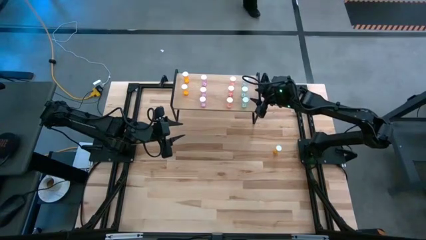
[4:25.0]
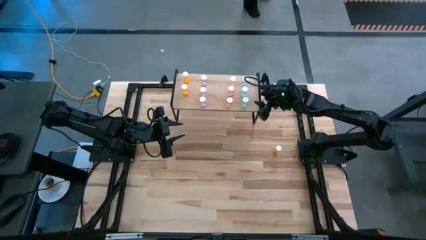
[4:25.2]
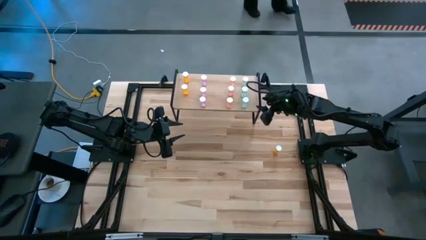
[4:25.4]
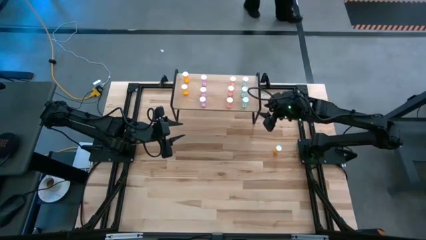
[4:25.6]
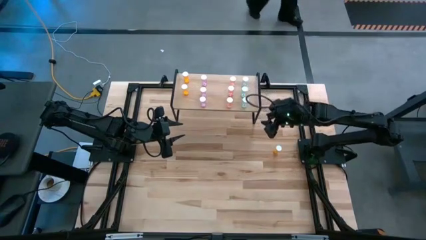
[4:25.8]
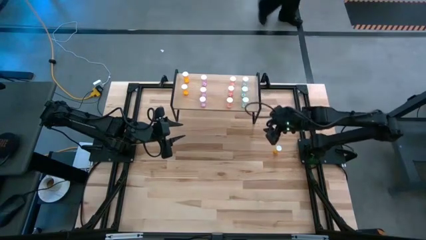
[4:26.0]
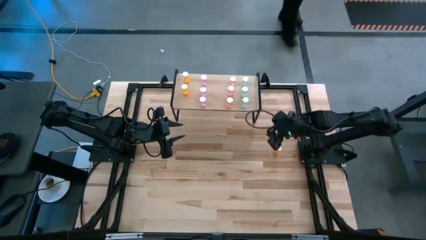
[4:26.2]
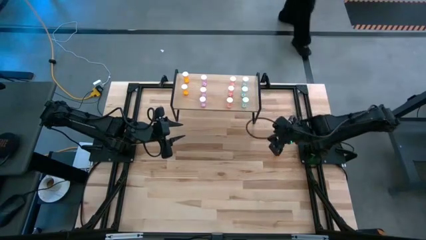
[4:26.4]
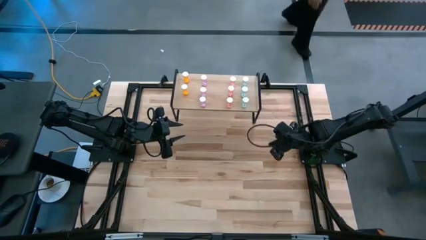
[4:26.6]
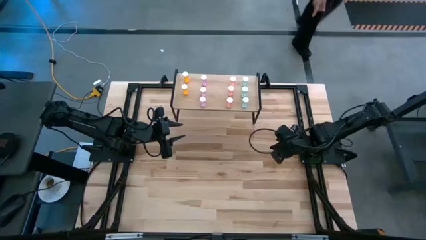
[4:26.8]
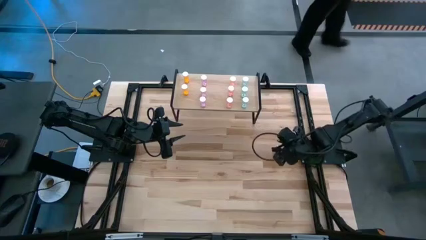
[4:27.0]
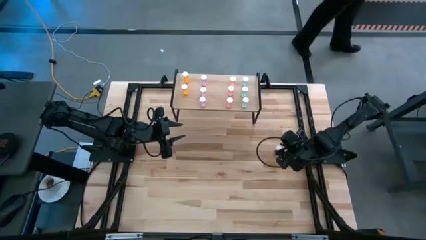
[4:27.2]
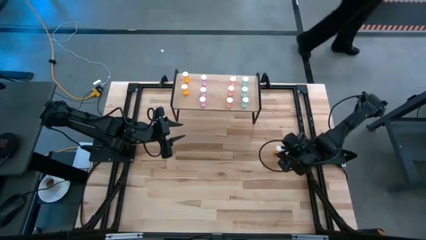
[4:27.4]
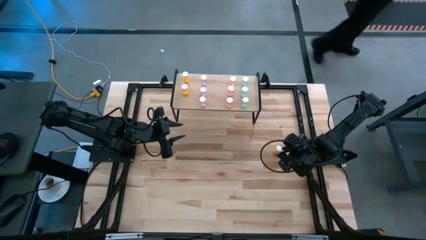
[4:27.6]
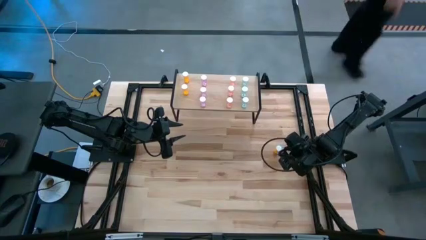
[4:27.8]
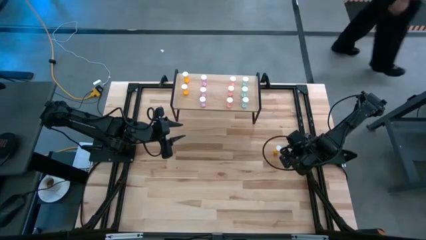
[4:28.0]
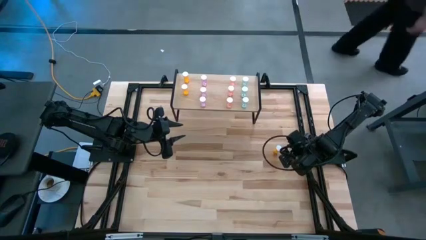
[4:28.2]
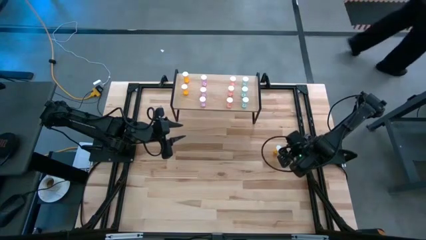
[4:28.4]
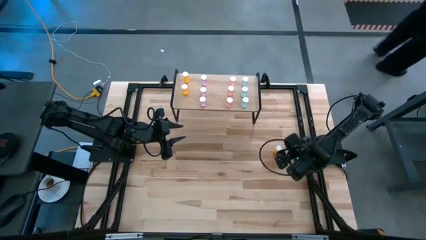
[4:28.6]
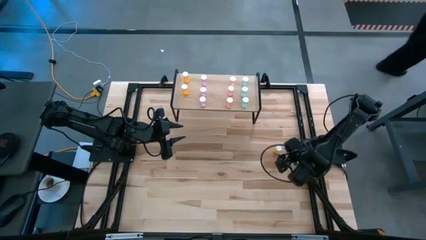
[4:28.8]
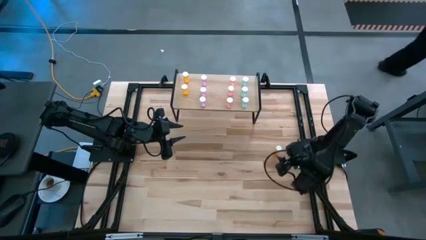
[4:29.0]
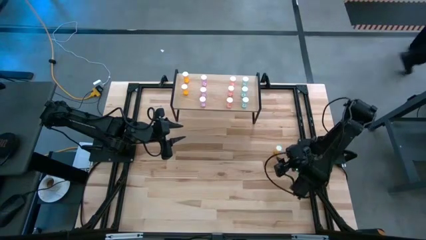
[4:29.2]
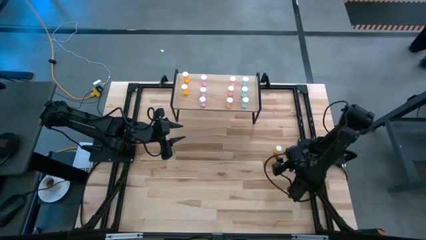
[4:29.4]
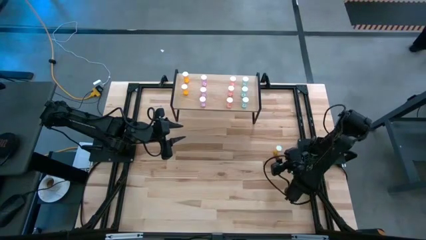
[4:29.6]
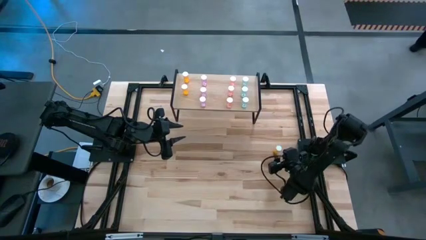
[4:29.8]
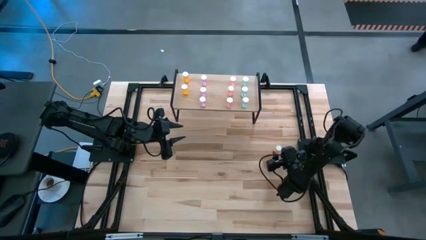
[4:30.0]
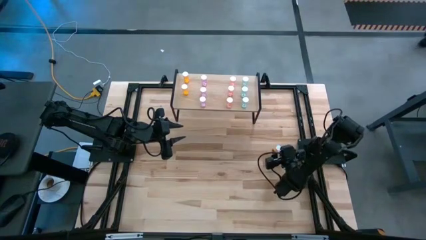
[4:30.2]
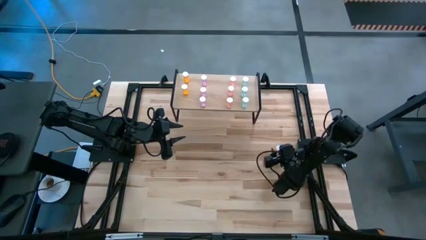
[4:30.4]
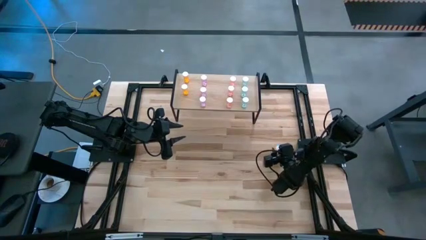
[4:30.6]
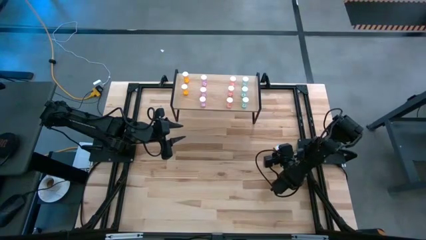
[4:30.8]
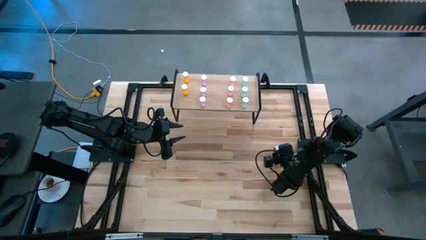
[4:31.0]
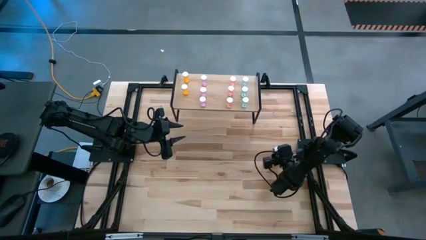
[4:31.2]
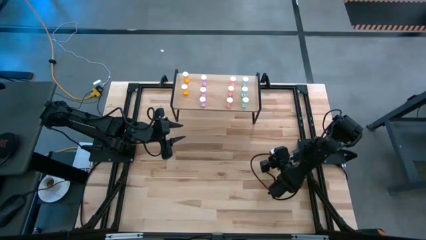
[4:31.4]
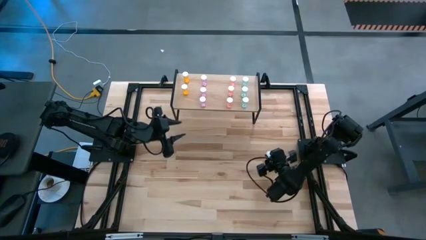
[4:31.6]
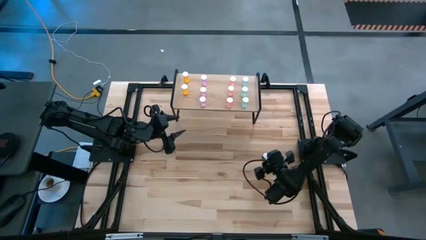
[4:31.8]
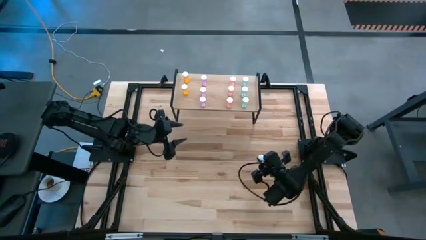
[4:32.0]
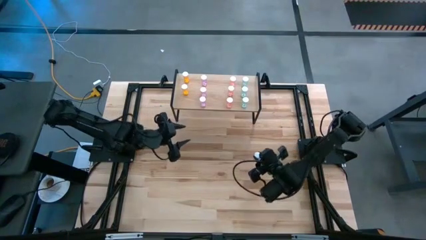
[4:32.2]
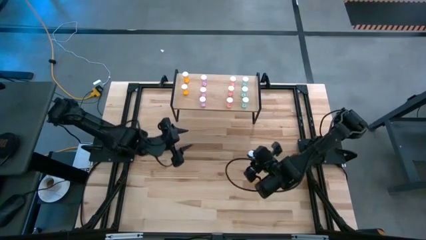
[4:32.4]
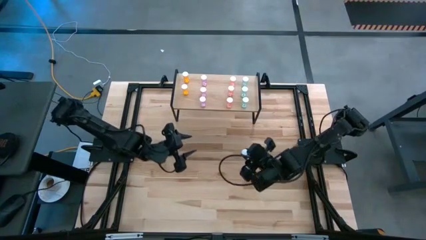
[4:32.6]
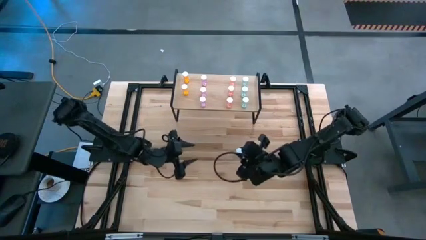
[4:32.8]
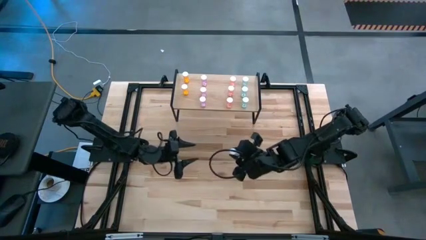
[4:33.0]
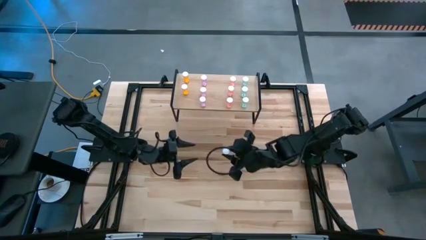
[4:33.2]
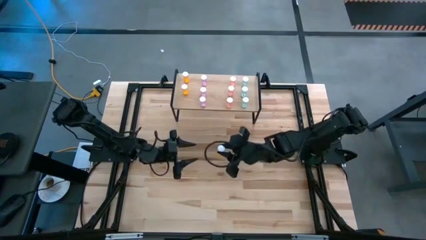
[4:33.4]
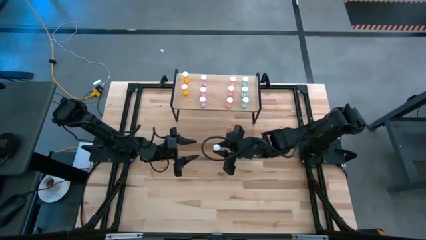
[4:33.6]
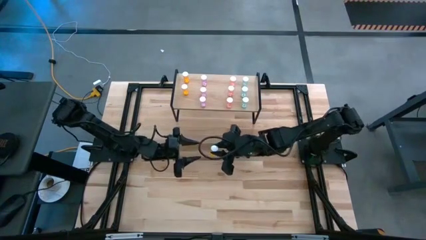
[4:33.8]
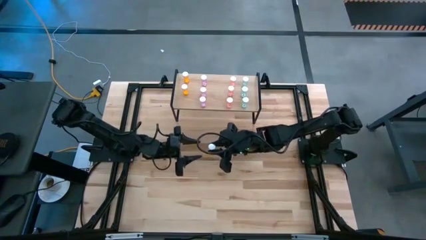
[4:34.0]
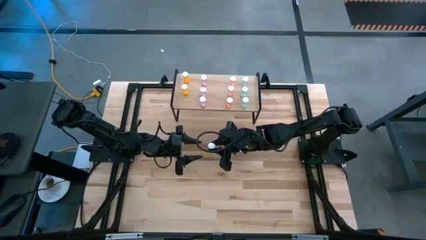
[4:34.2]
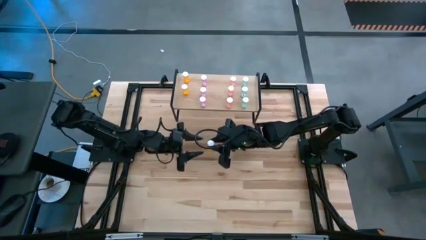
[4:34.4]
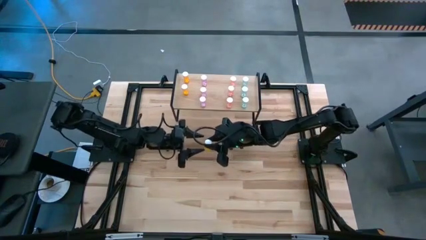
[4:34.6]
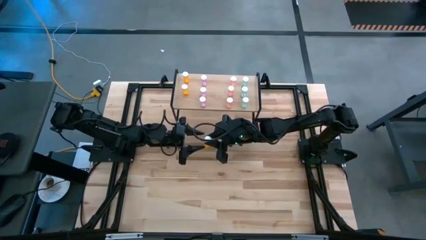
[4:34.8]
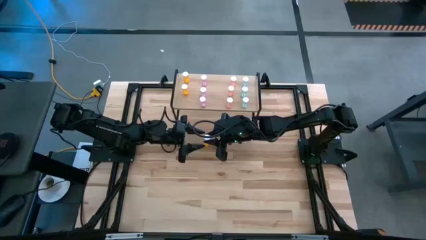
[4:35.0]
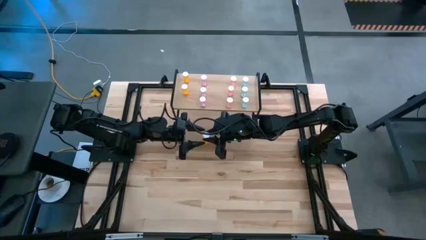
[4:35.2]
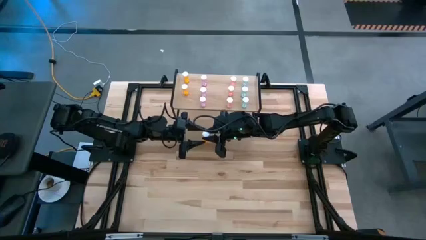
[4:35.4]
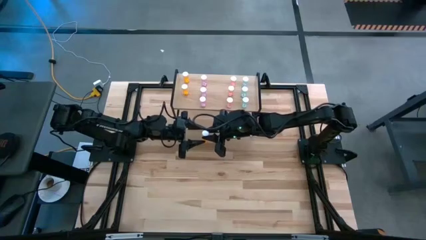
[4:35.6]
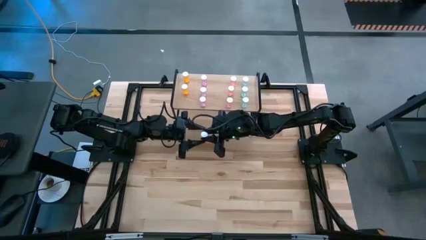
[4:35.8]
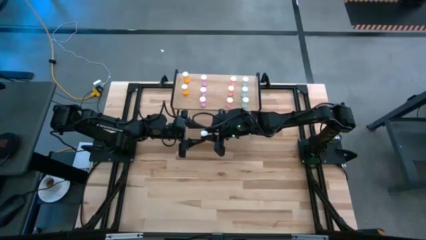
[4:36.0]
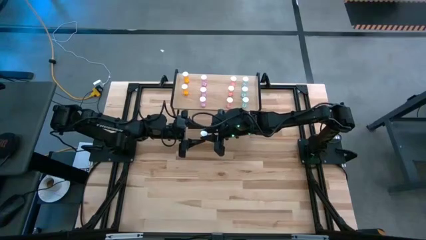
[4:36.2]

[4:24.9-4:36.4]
Task: Pick and place medicine bottles onto shelf by color
Put the orange pill bottle on the shelf aligned with the other orange pill bottles

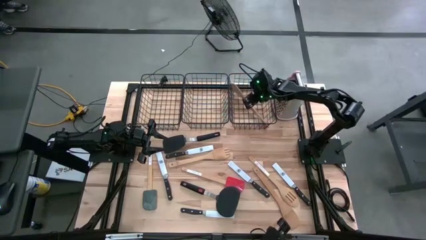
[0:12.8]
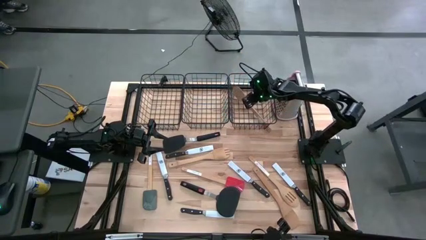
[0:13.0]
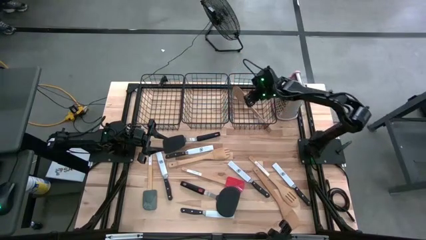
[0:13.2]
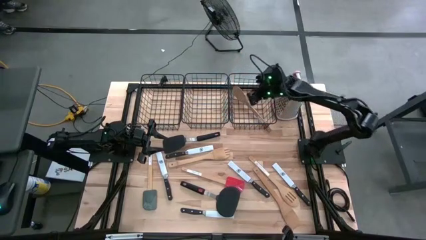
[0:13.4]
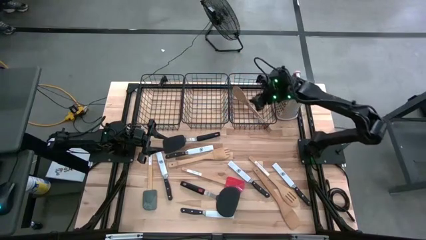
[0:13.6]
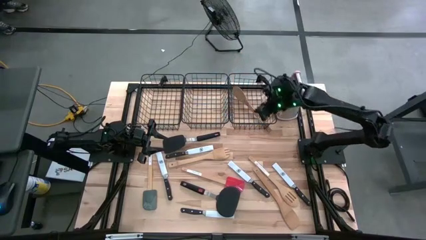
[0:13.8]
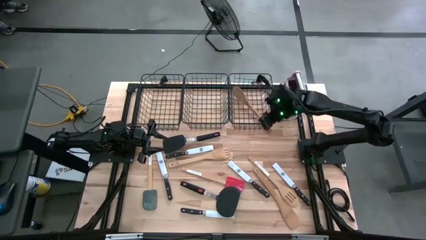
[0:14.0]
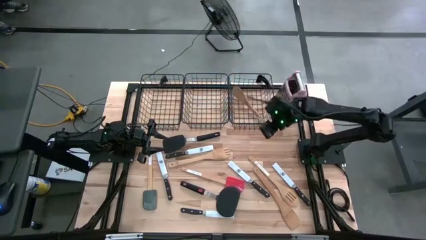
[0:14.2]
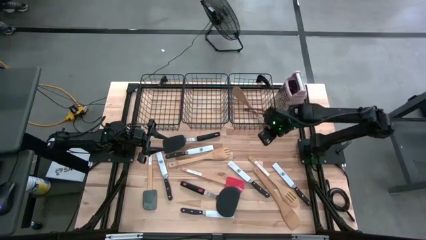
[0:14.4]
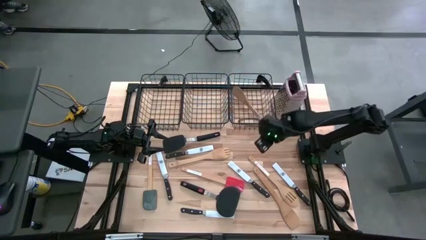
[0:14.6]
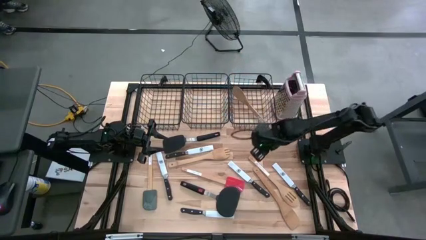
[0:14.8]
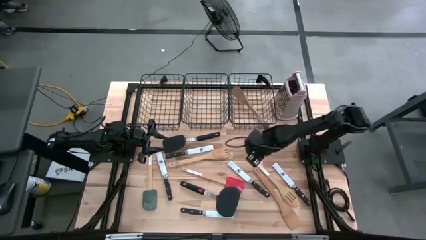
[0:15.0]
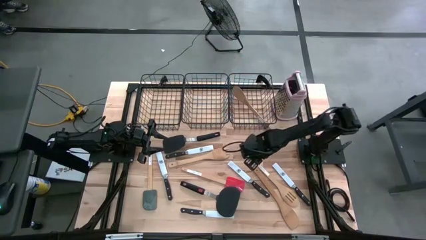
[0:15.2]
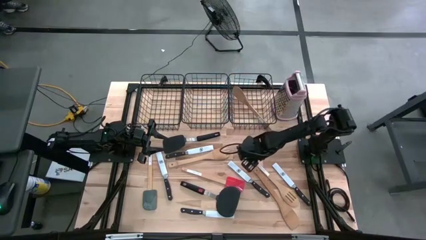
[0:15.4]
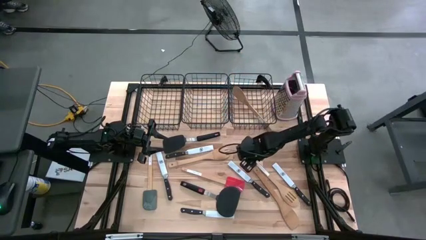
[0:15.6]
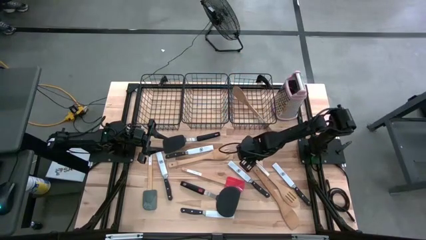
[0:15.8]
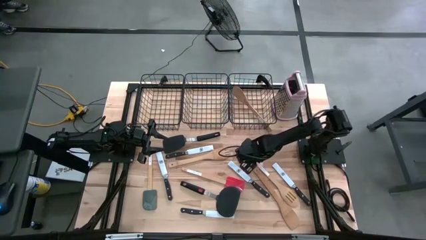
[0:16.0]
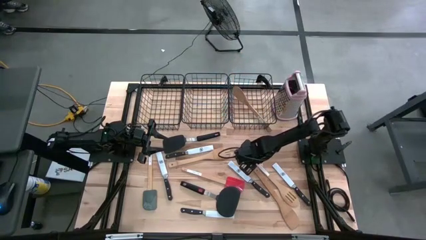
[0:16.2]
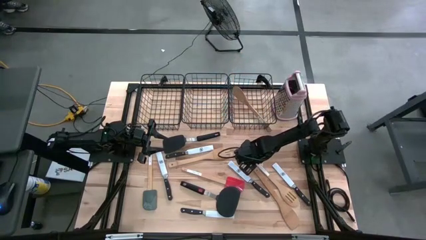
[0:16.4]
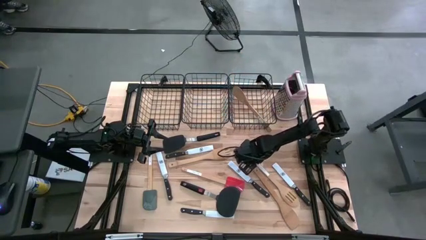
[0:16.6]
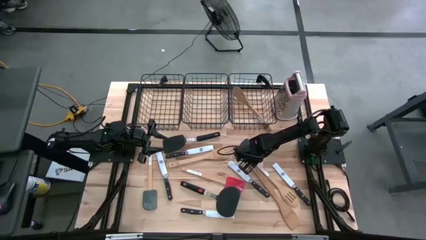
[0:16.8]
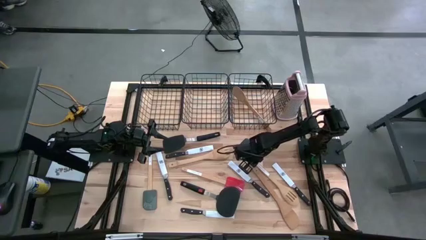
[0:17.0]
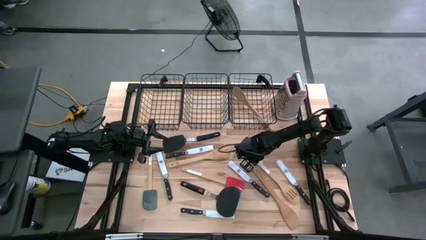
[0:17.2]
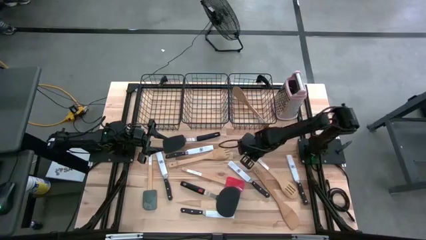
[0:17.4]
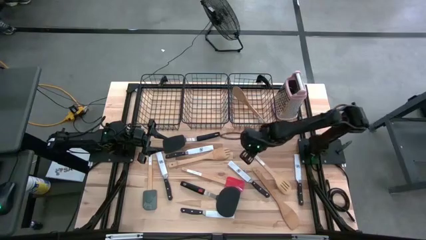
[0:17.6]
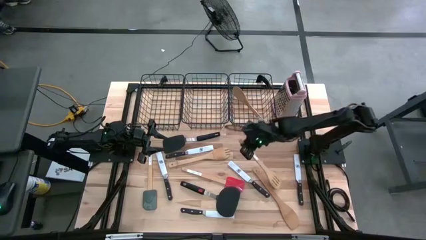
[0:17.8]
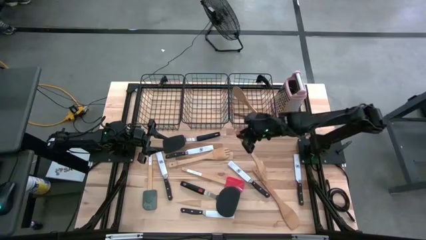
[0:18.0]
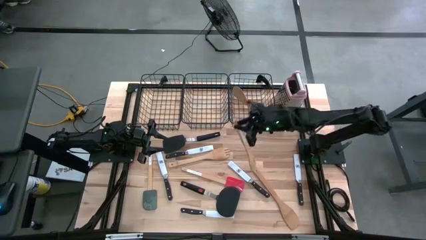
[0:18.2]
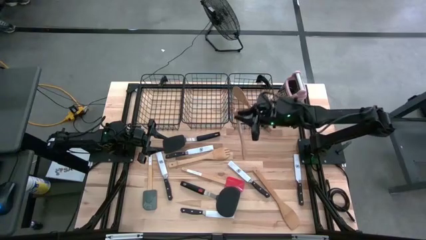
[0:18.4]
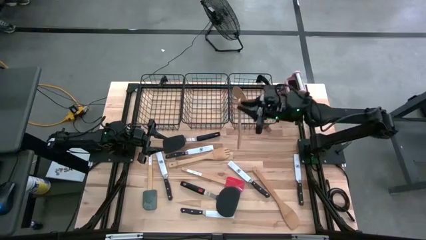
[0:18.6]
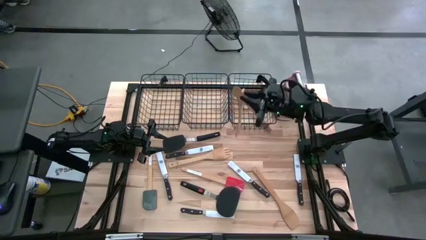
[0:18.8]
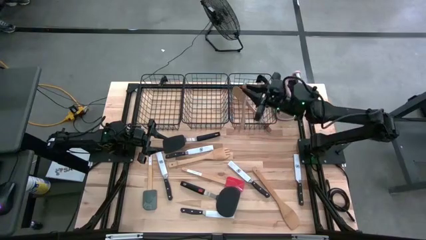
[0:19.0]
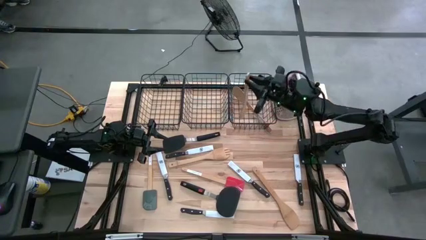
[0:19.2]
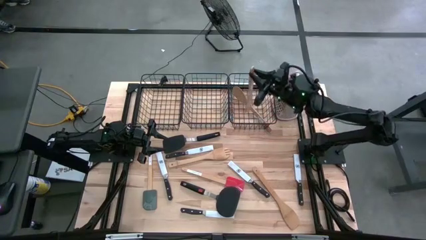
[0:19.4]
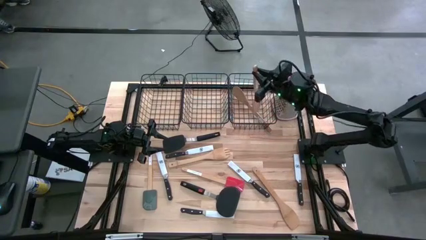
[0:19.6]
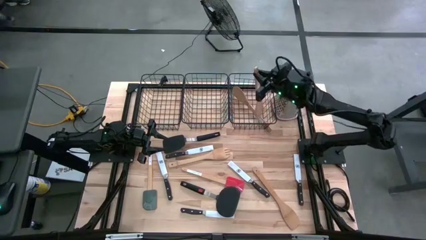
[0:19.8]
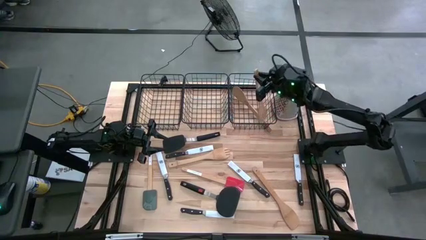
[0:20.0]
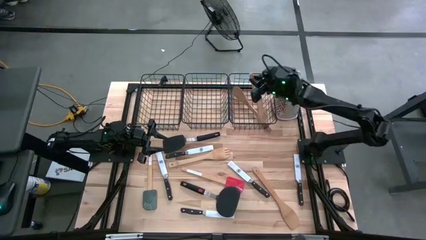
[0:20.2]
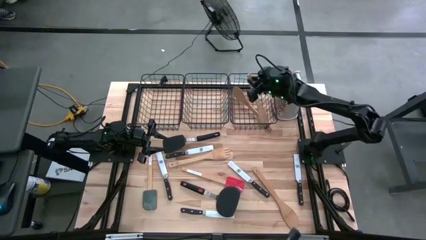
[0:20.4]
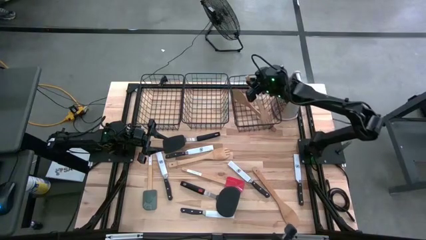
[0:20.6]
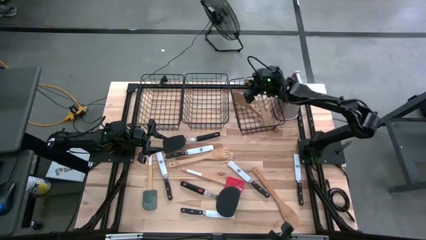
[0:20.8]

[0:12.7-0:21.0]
Task: Pick & Place Kitchen Items
Put the brown serving spoon into the right black wire basket
